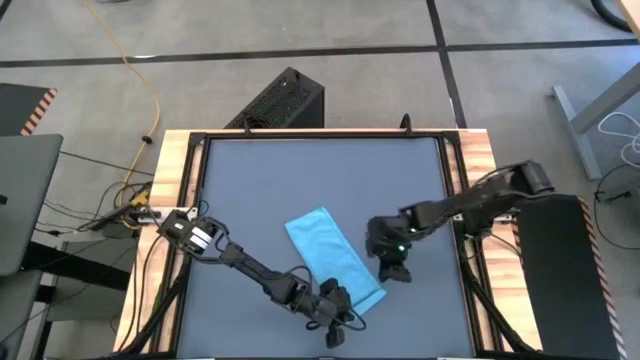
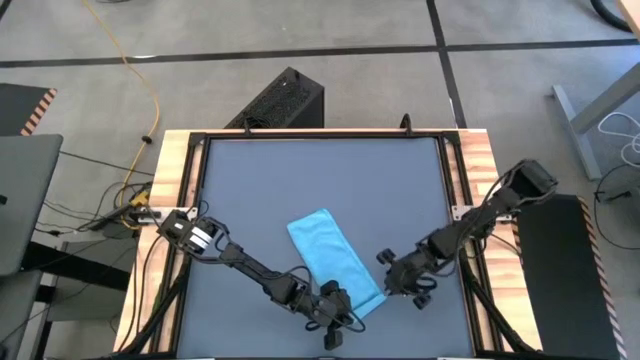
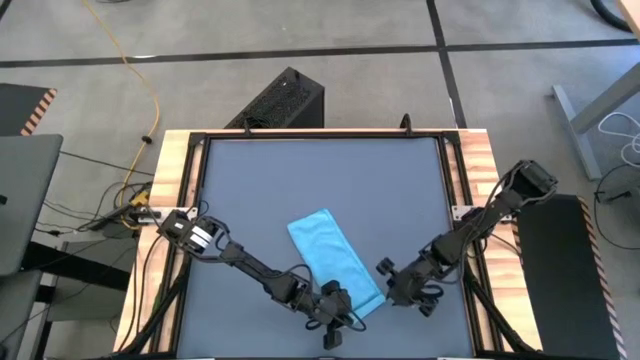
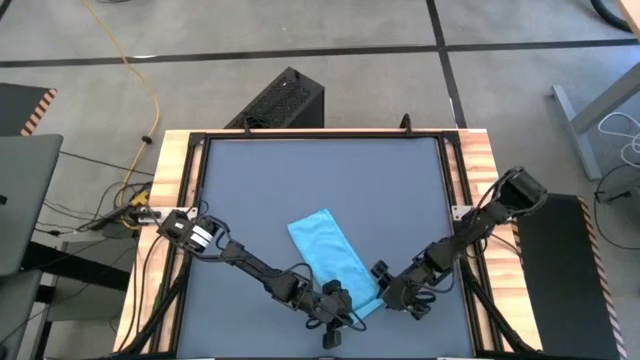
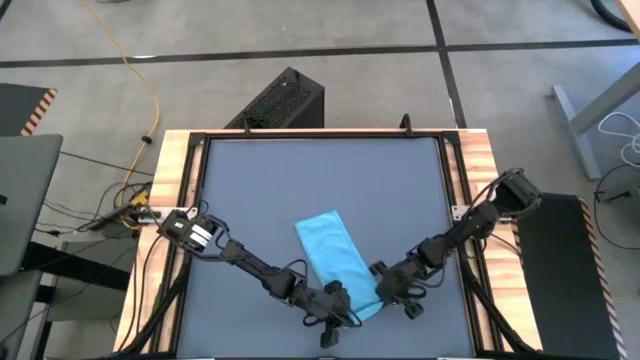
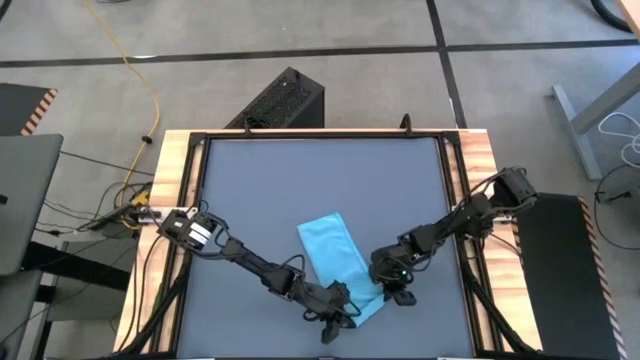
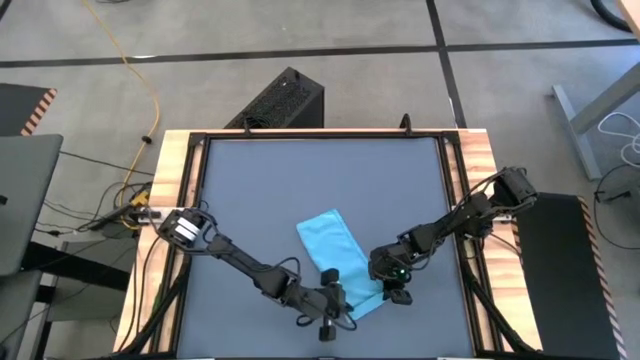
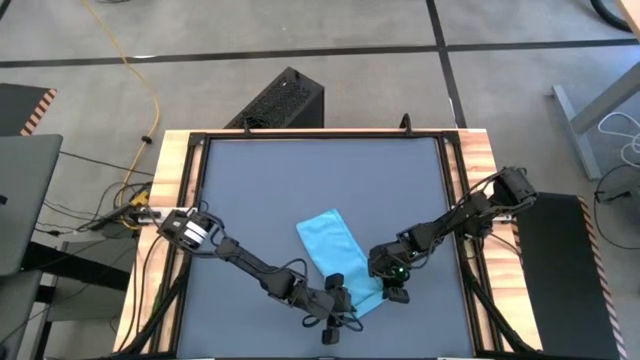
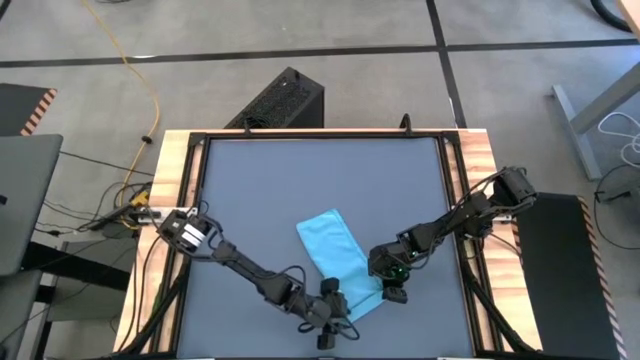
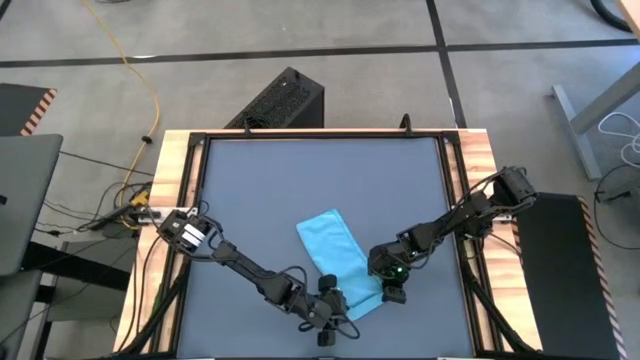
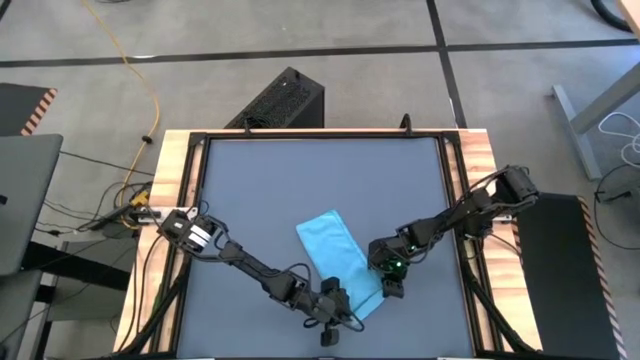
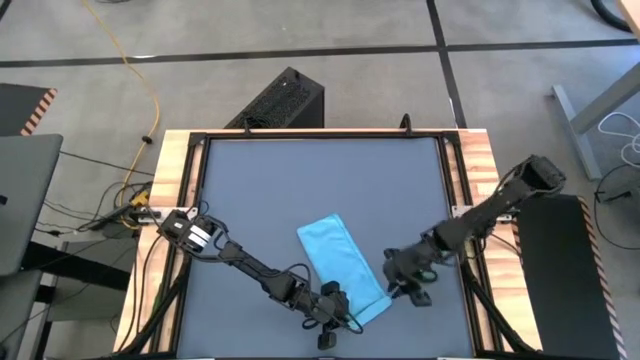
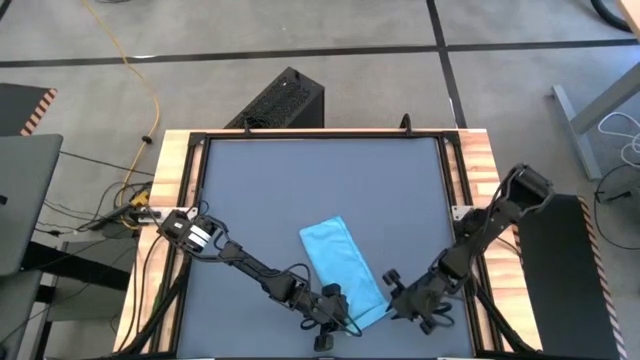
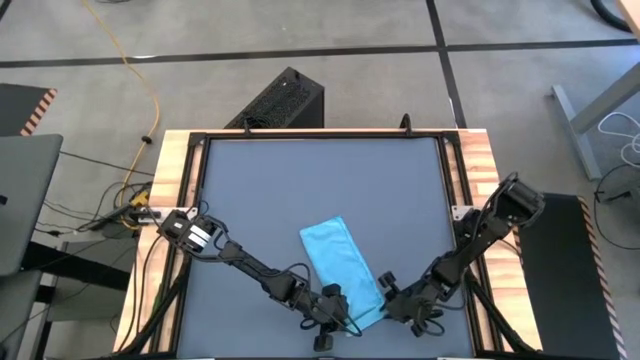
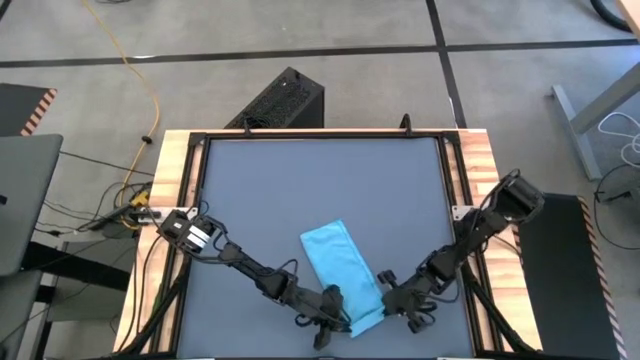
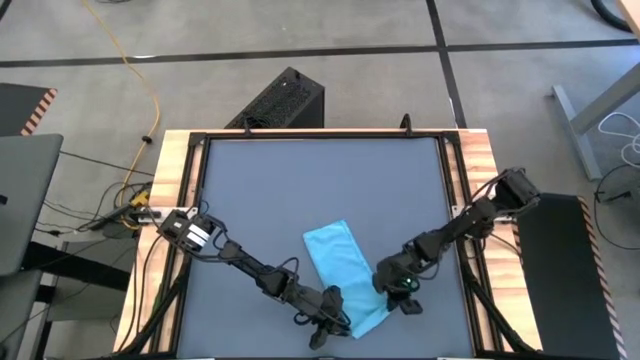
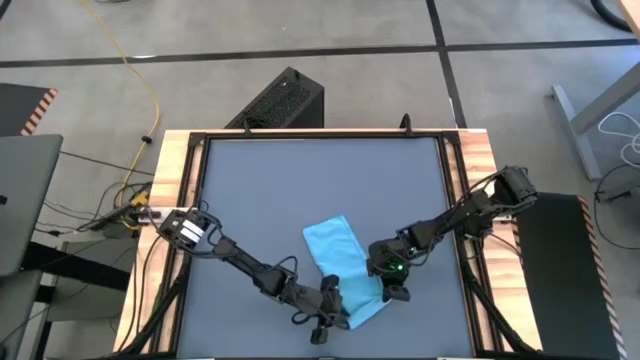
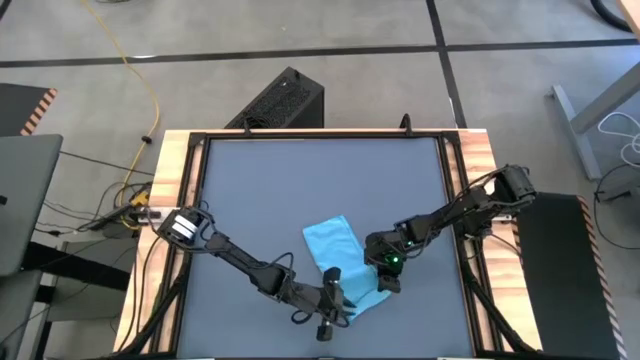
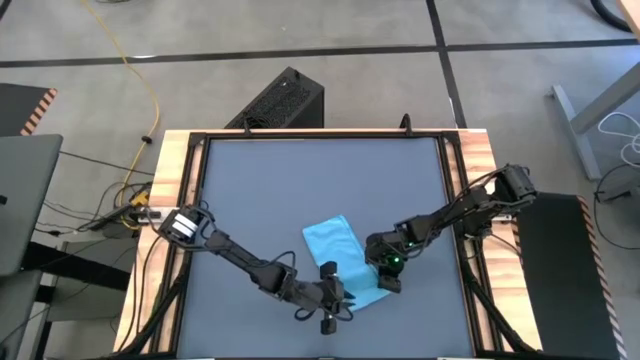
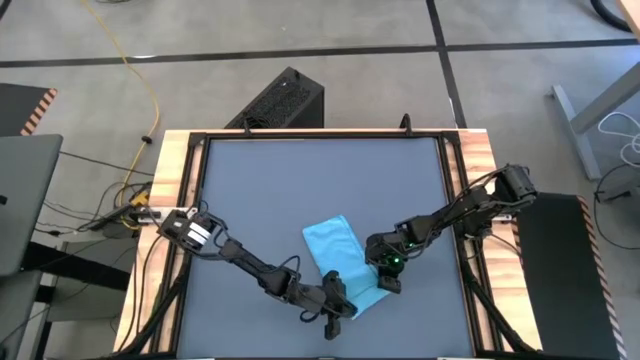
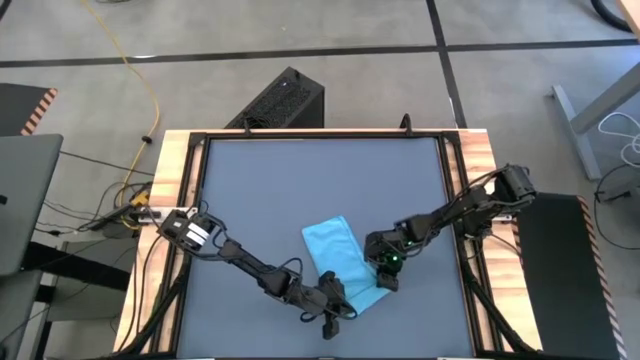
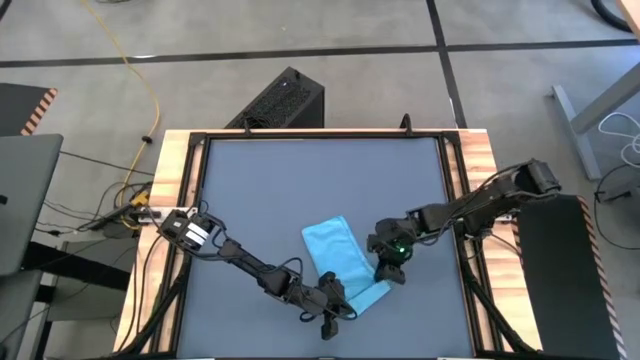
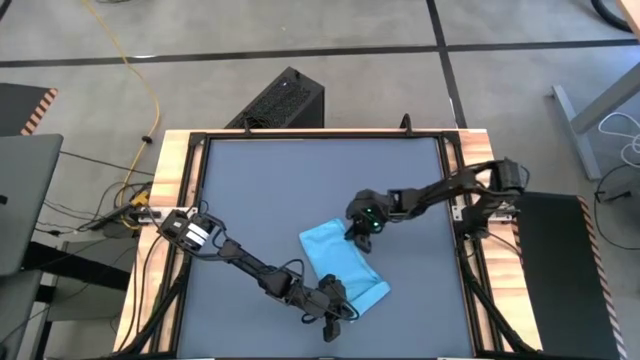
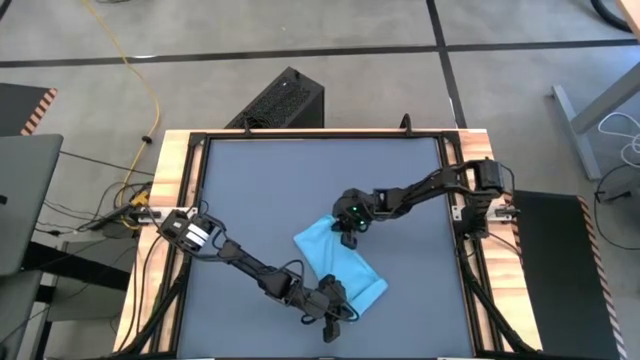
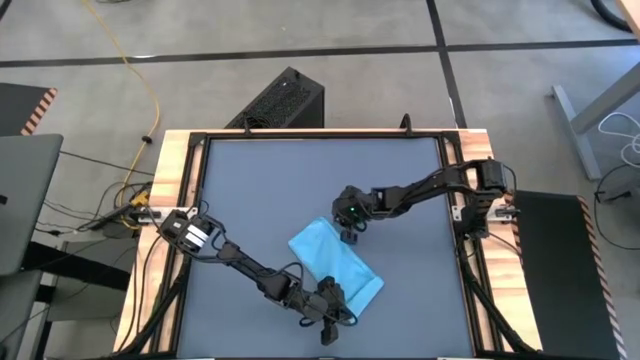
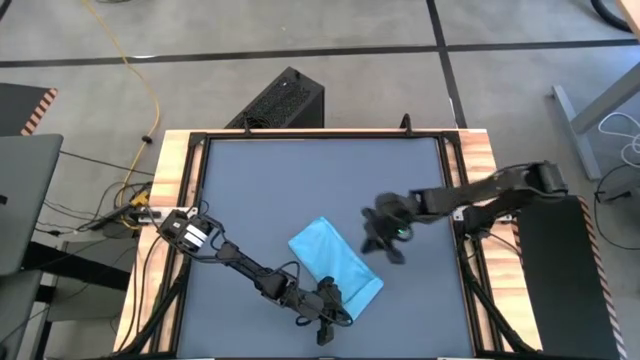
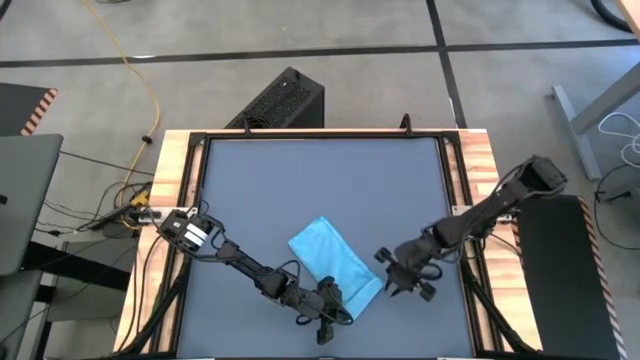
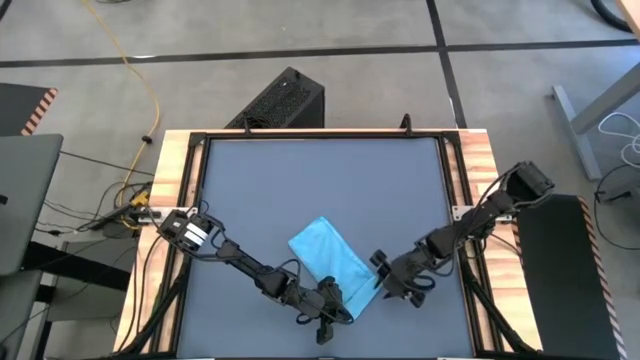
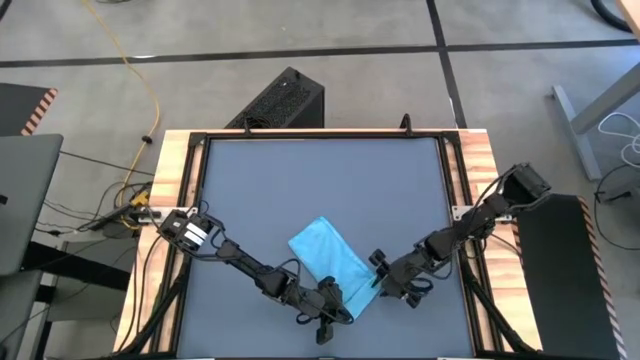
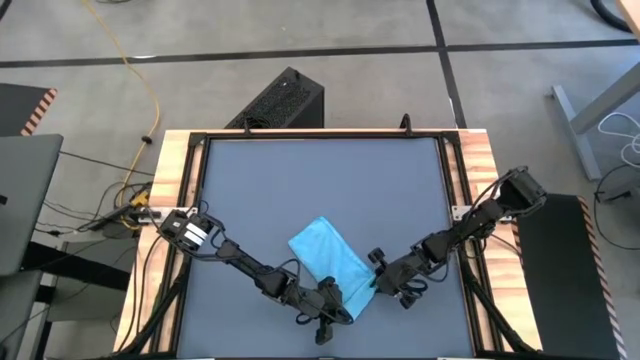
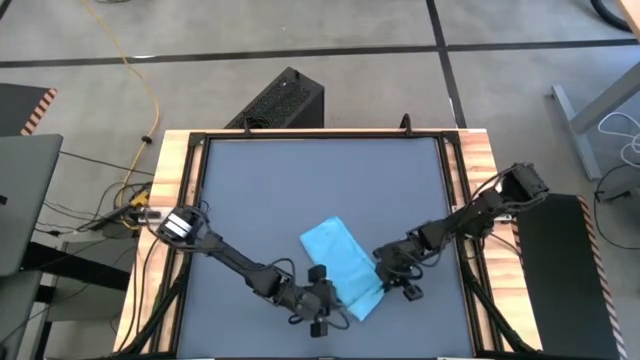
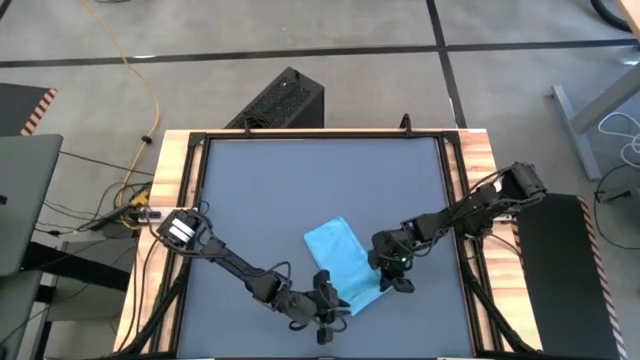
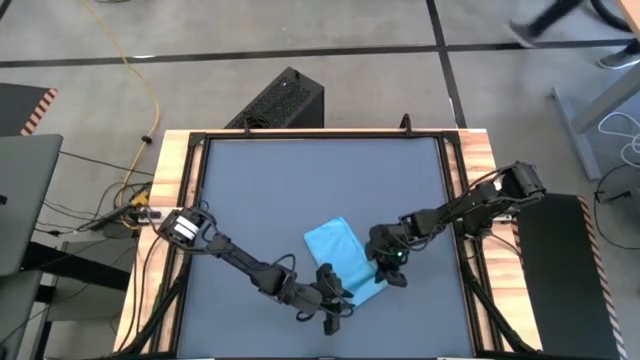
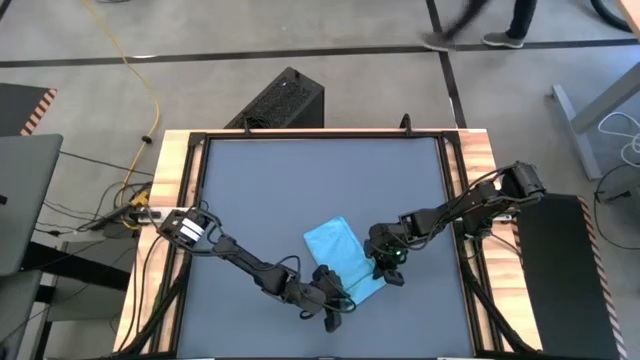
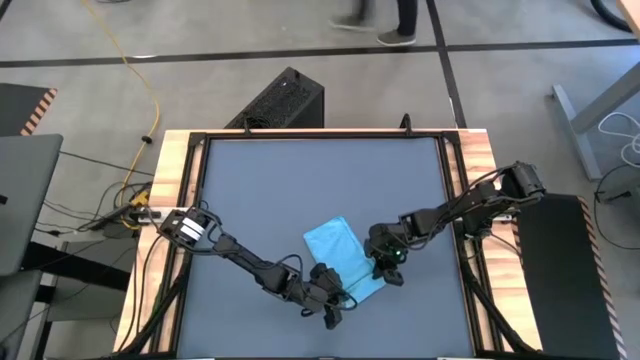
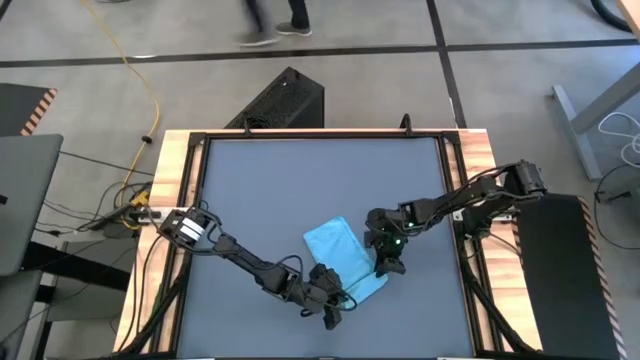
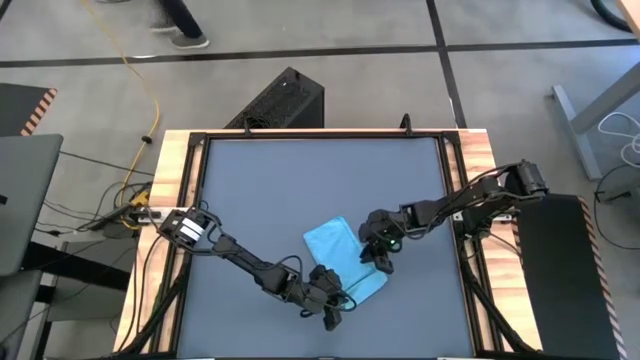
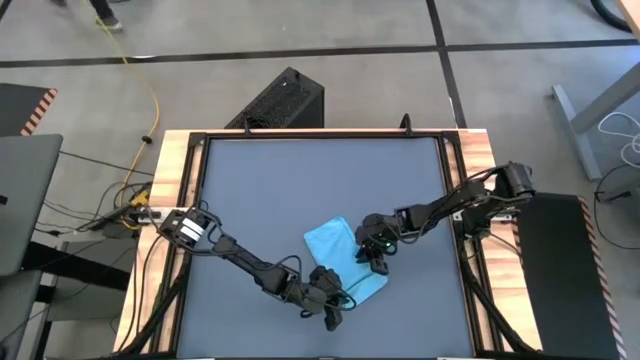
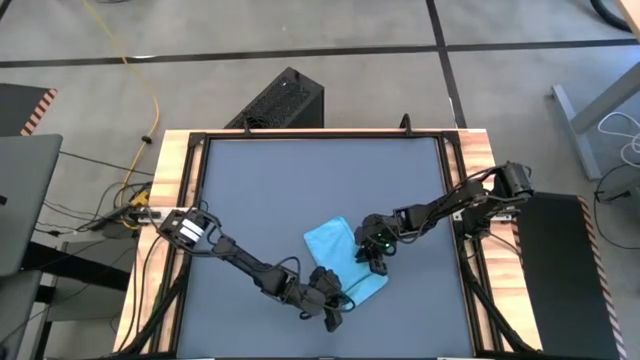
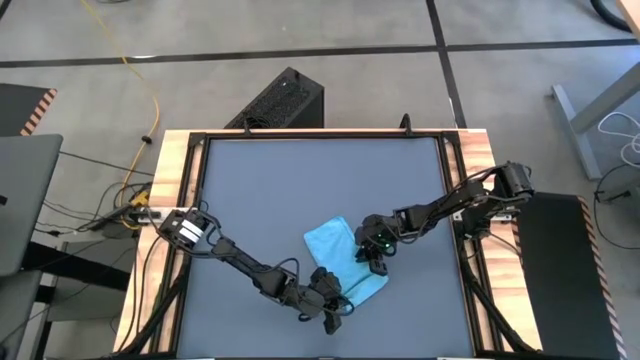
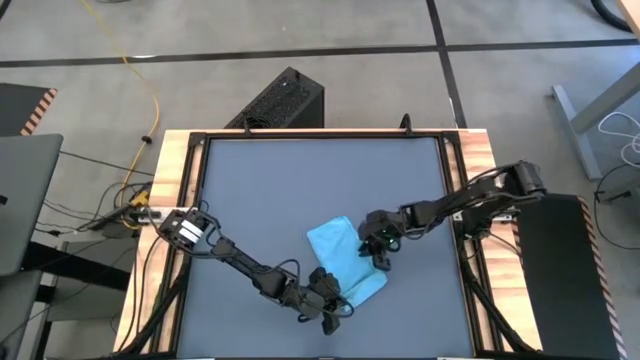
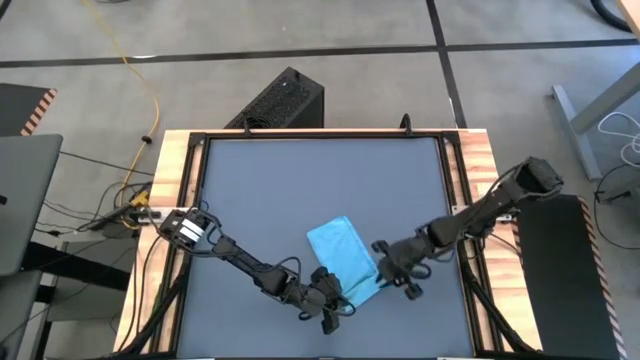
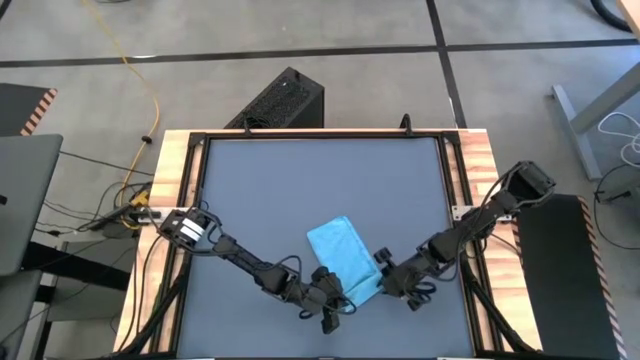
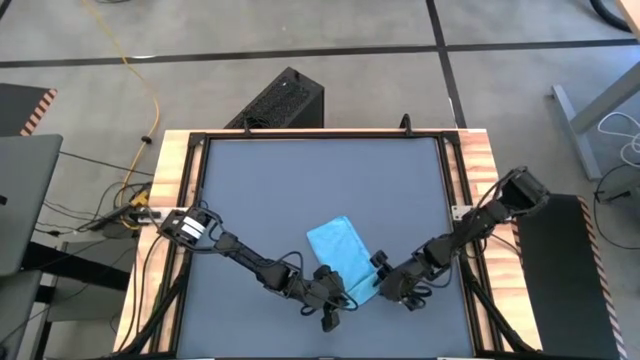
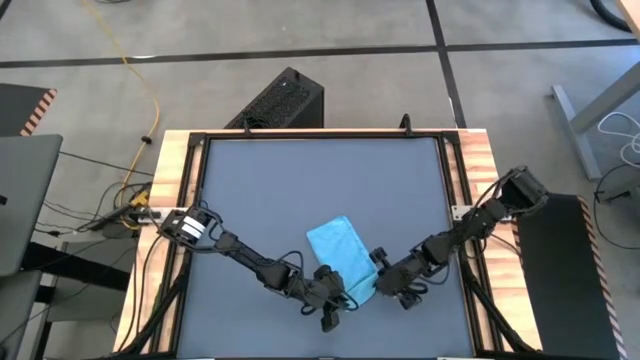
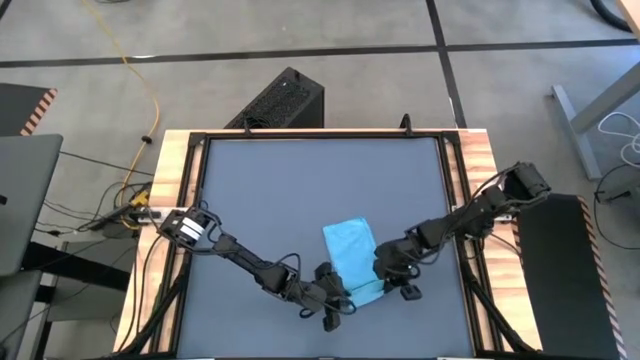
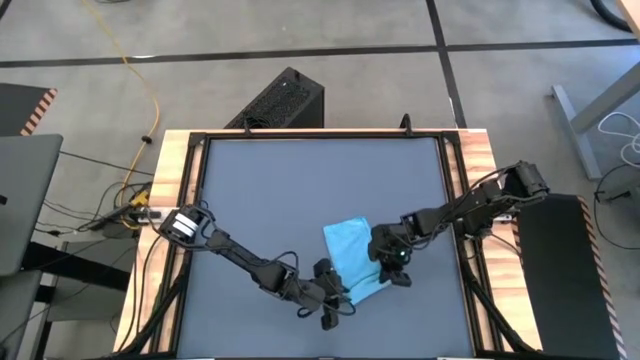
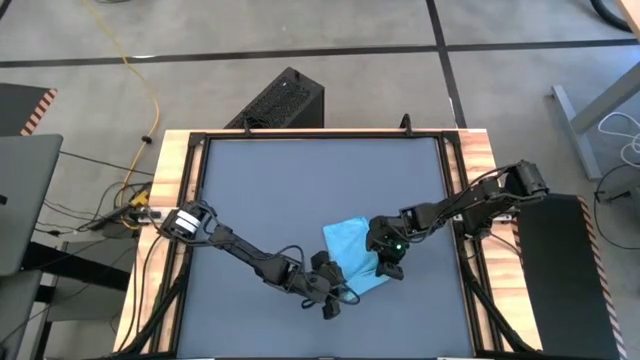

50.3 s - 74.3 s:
Task: Roll towel into tight, uniform cylinder
Roll the blue microfiber cloth
